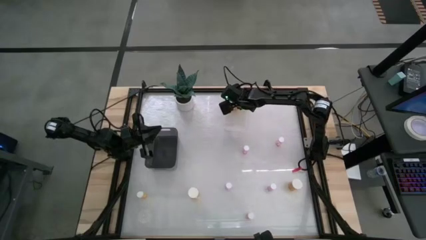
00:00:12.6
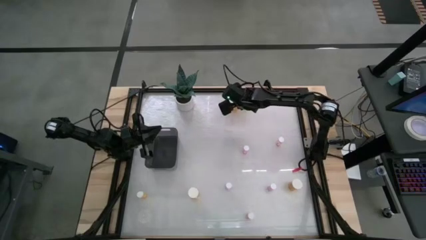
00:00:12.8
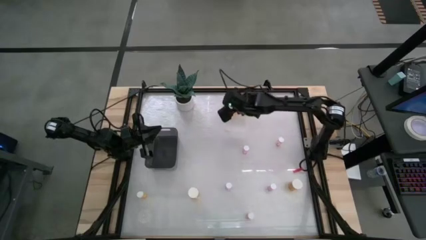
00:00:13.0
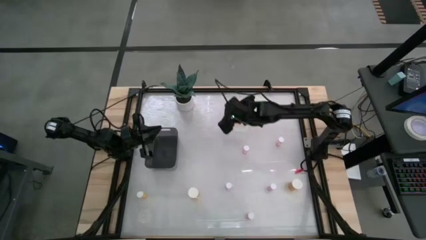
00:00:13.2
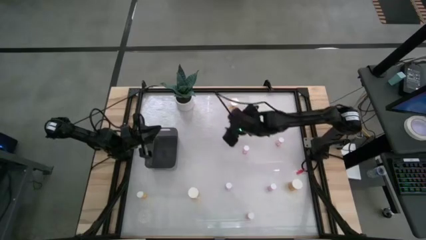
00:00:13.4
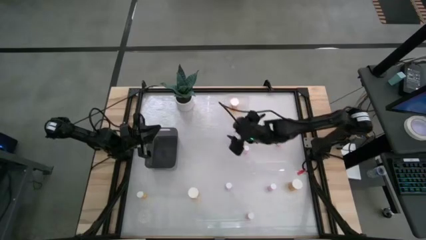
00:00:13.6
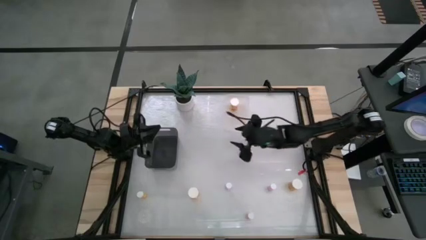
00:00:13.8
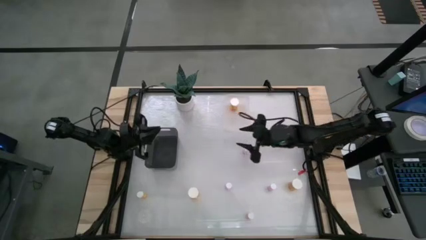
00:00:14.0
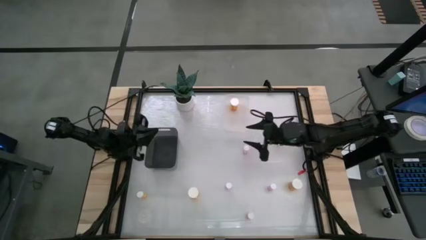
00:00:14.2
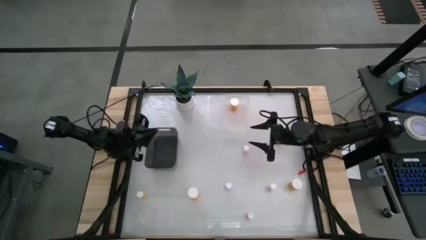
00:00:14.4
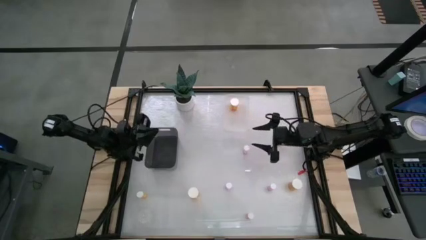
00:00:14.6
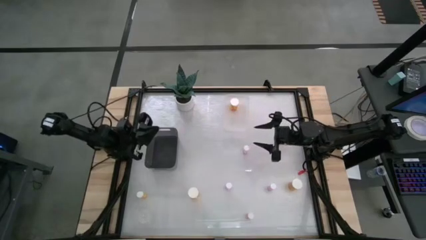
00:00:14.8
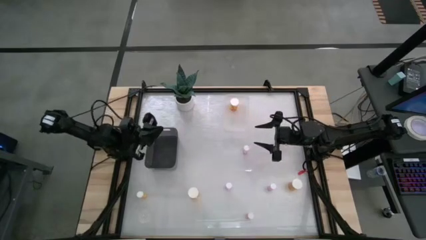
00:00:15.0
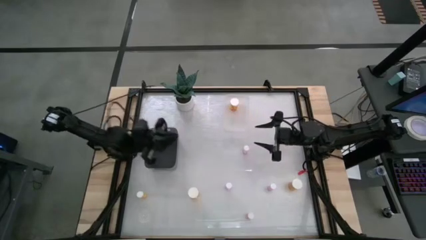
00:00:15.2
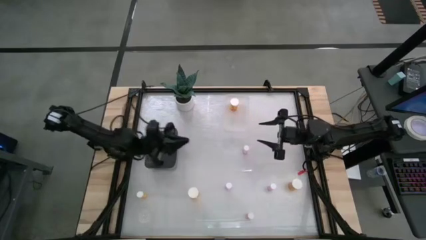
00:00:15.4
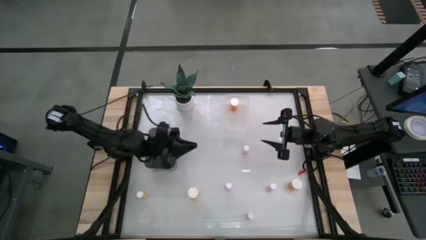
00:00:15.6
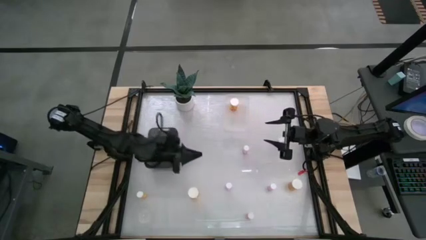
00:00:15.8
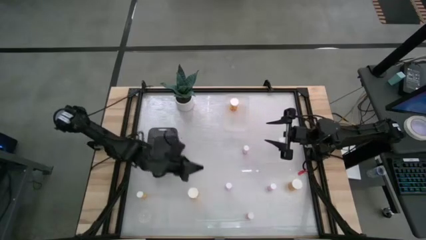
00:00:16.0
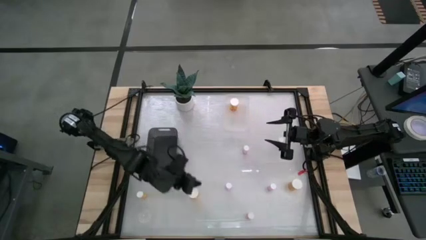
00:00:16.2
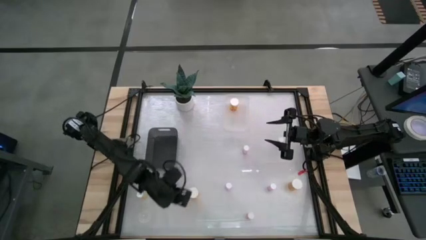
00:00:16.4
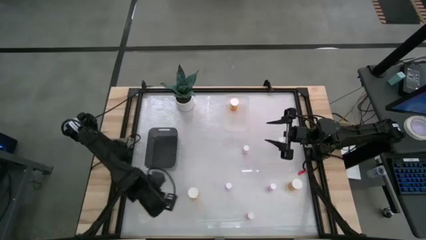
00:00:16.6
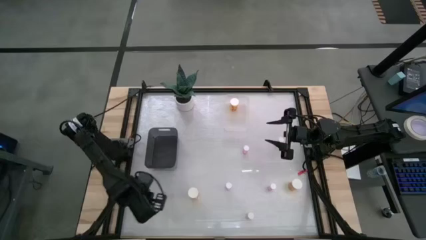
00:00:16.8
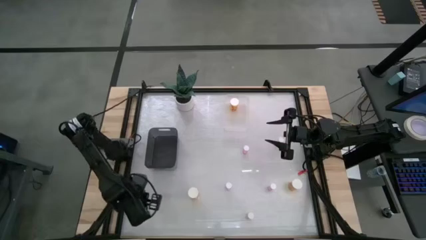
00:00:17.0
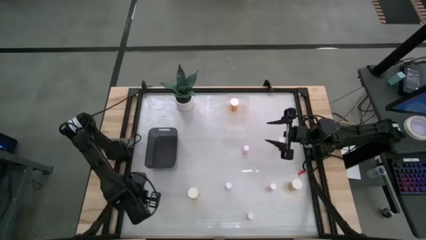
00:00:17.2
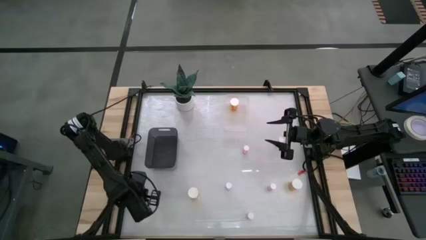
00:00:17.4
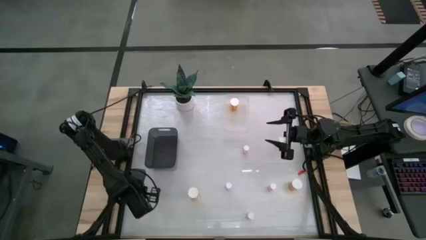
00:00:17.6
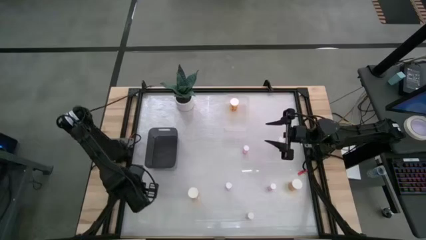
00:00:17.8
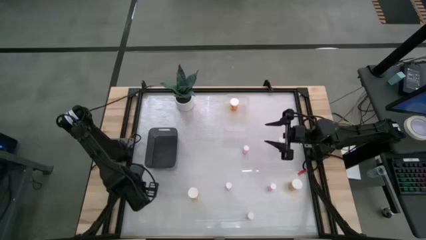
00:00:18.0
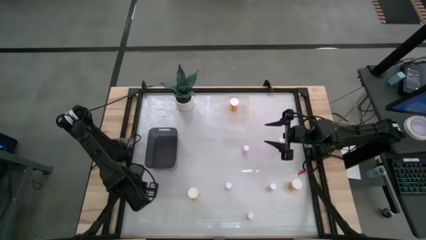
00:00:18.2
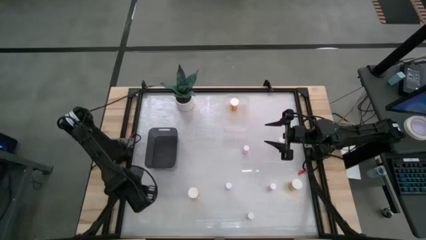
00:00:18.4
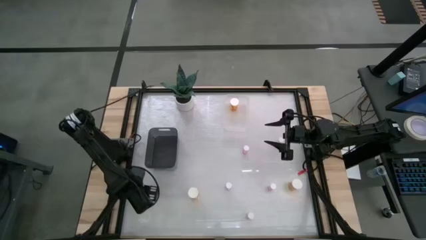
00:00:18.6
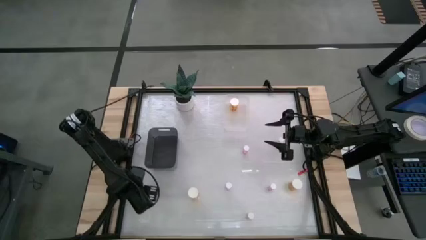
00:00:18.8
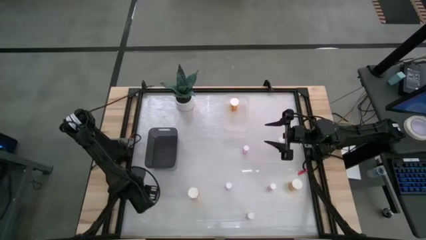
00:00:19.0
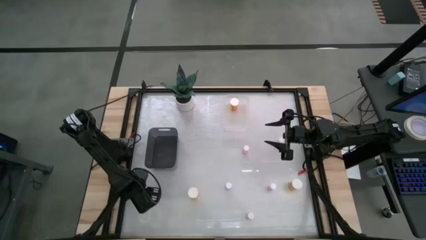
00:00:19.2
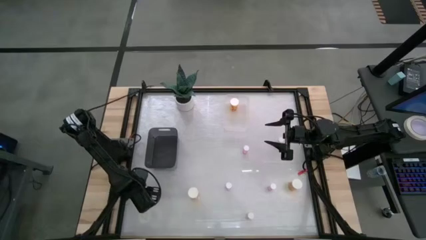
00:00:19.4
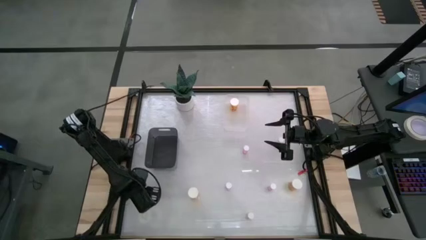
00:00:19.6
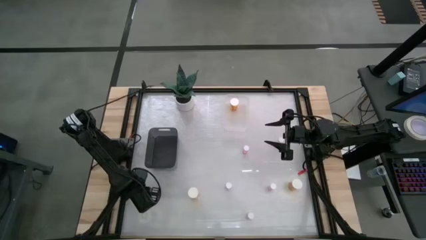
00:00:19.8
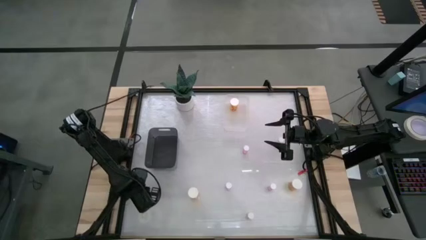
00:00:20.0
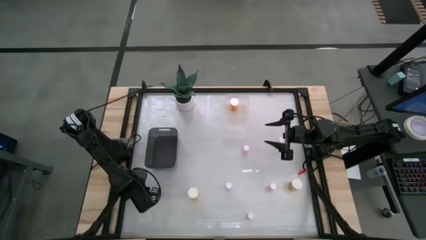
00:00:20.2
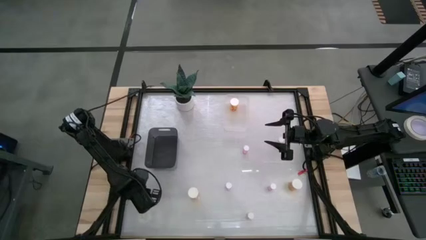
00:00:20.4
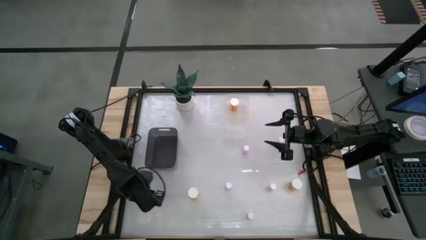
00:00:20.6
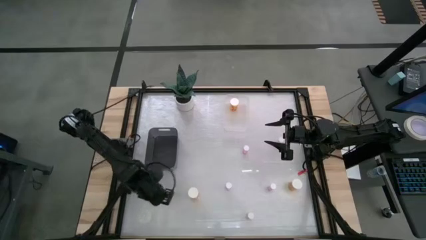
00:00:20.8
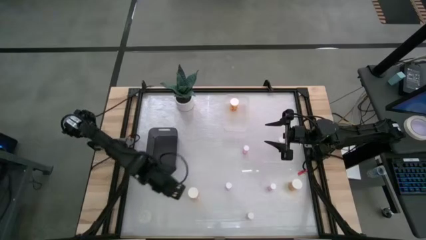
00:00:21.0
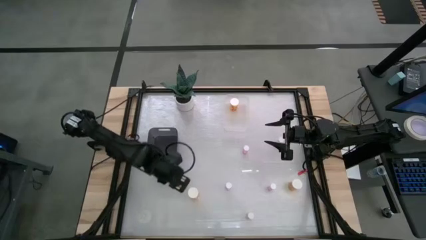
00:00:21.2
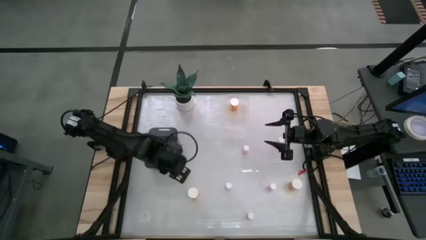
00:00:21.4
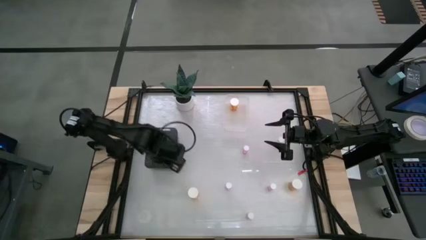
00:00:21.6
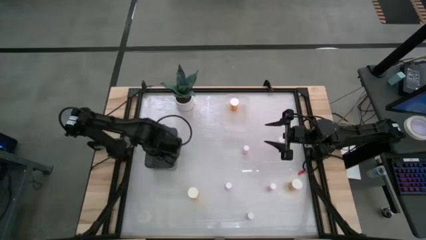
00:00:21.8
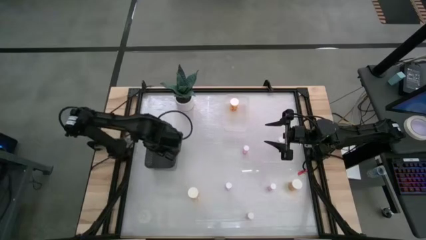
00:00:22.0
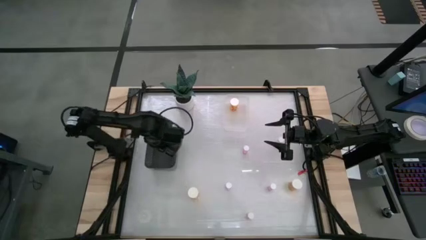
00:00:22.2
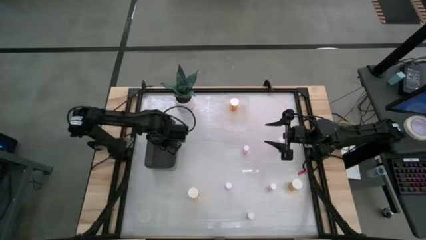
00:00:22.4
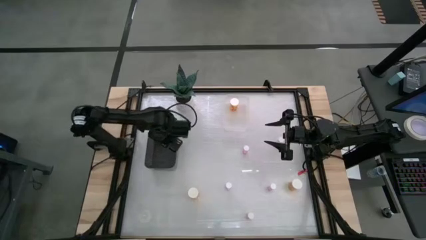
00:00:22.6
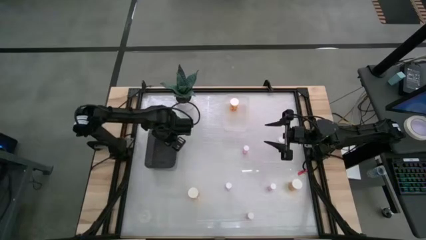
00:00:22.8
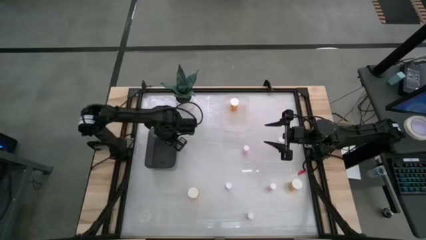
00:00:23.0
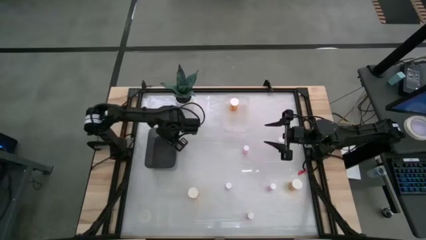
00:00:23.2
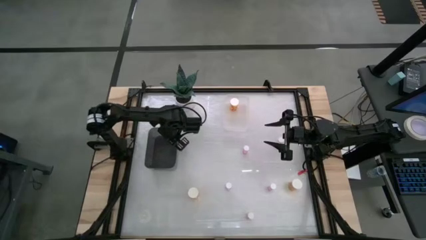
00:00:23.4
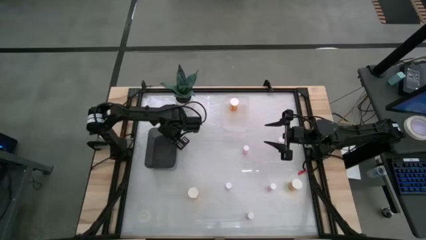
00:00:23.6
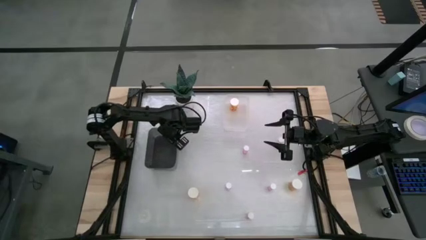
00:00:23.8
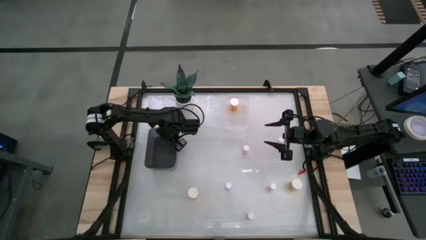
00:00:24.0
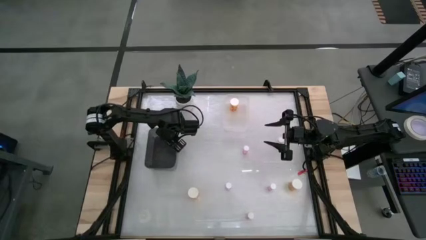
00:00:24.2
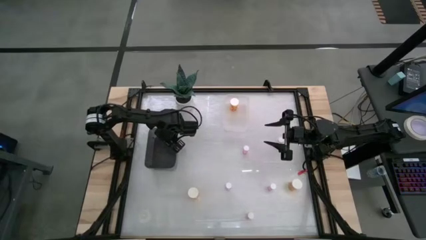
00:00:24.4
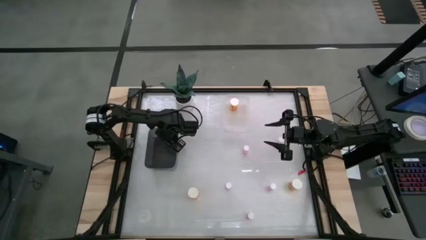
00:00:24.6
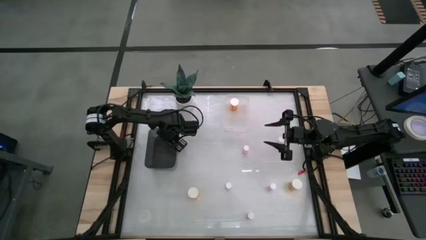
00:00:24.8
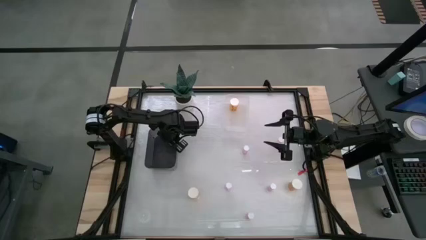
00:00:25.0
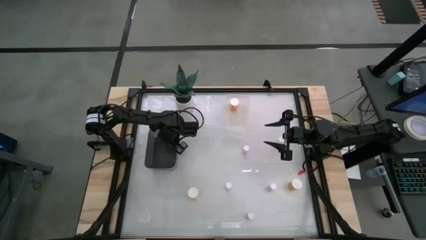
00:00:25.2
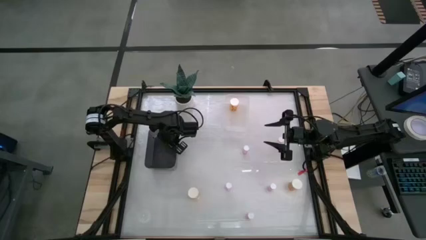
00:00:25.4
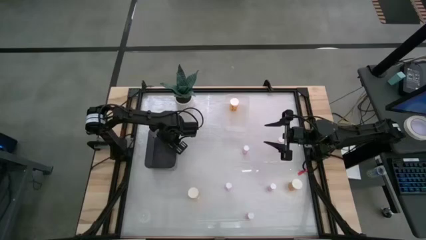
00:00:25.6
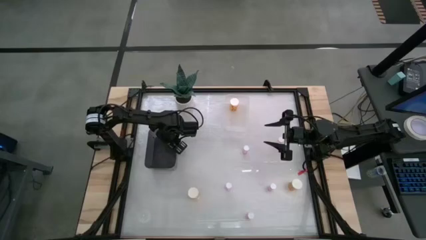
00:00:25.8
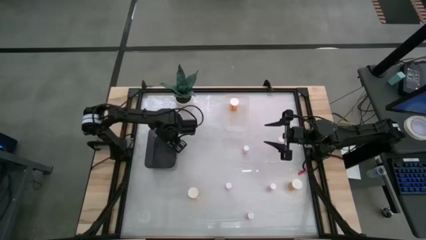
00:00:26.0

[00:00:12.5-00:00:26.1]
Task: Pick and place medicine bottles into bin by pill shape (circle, oval)
Put the small orange pill bottle into the black bin
